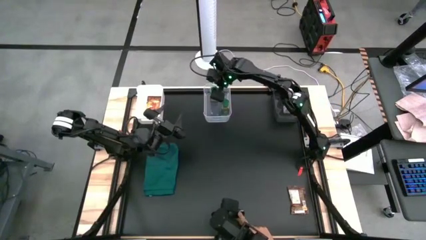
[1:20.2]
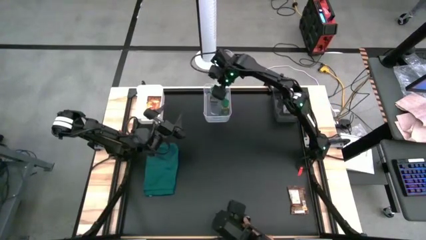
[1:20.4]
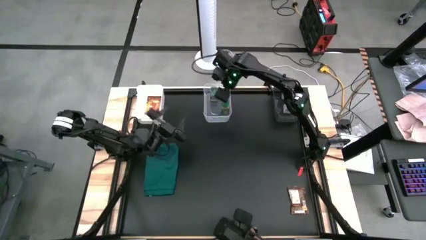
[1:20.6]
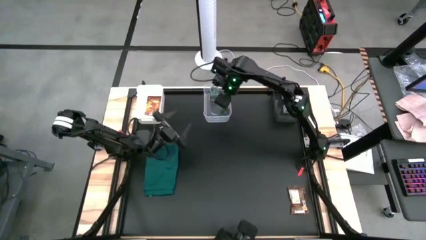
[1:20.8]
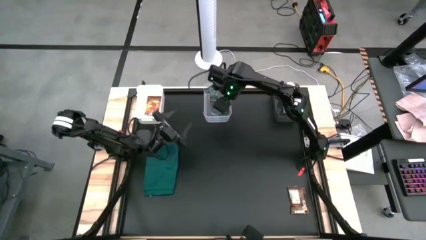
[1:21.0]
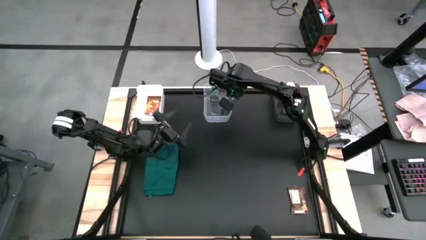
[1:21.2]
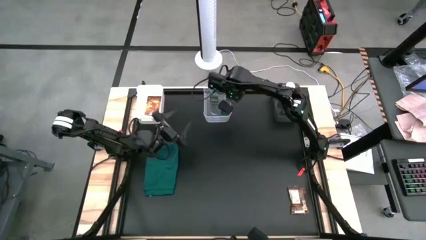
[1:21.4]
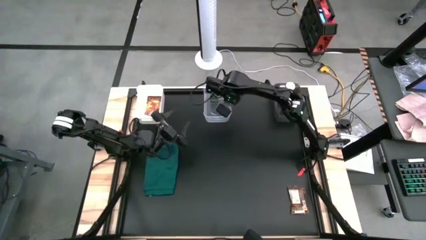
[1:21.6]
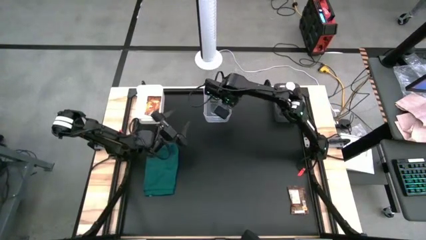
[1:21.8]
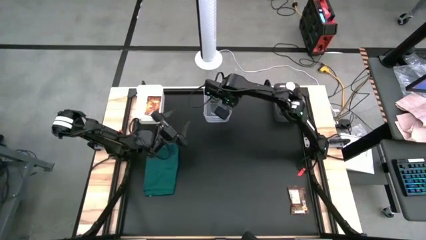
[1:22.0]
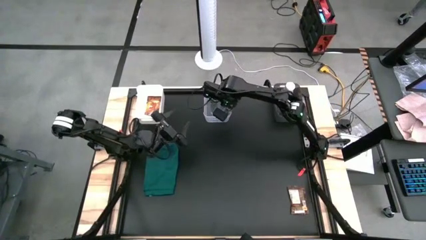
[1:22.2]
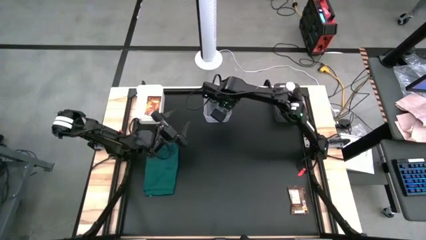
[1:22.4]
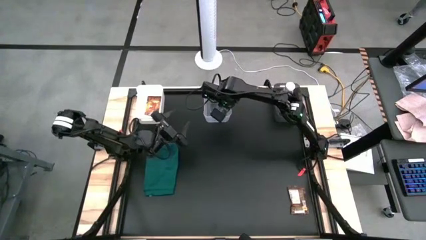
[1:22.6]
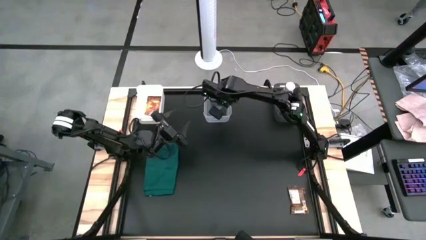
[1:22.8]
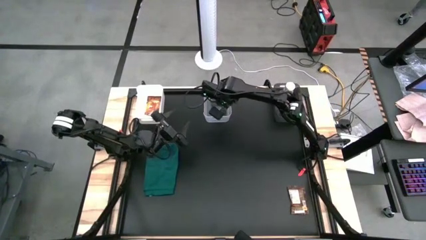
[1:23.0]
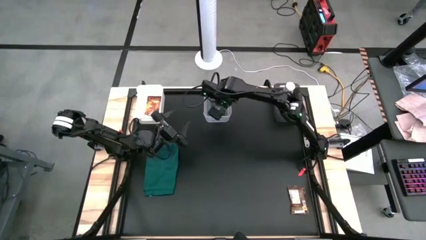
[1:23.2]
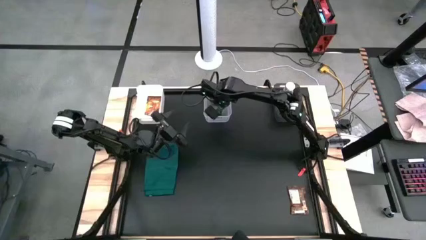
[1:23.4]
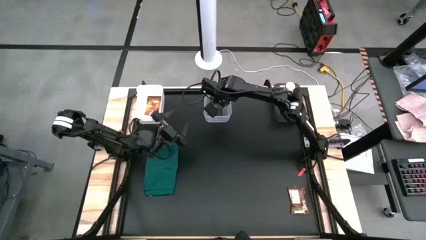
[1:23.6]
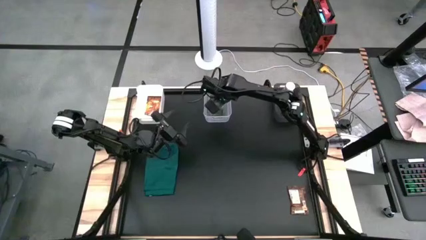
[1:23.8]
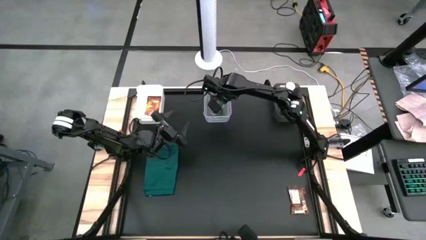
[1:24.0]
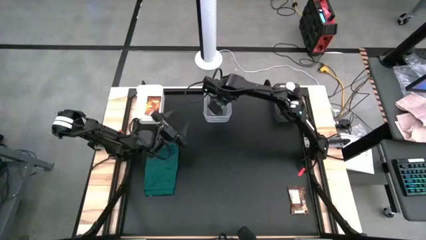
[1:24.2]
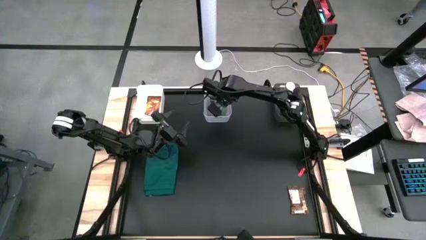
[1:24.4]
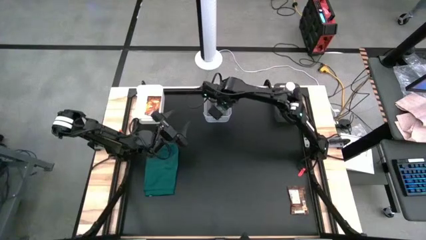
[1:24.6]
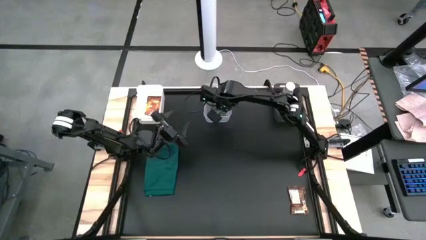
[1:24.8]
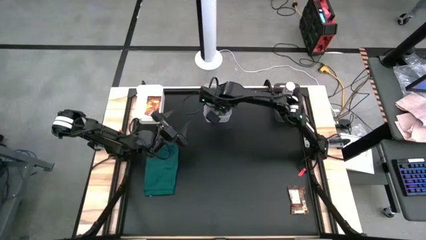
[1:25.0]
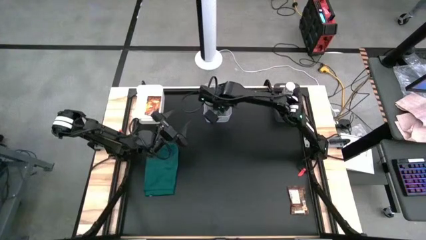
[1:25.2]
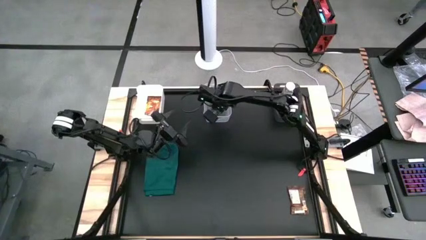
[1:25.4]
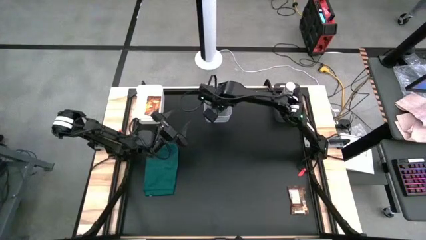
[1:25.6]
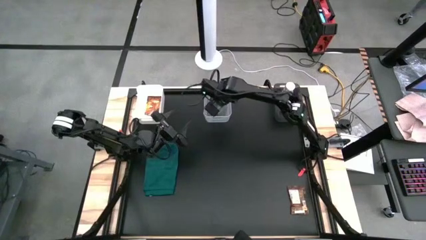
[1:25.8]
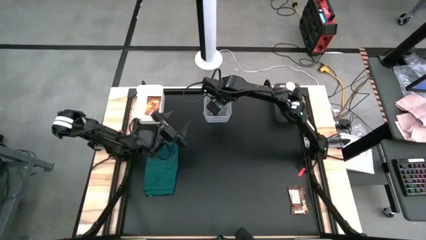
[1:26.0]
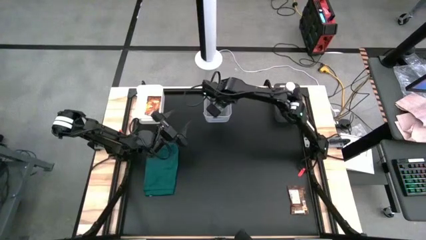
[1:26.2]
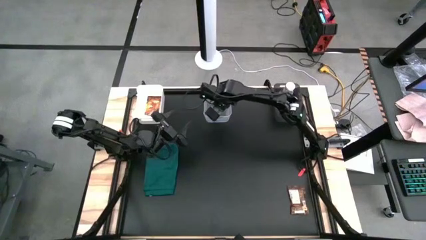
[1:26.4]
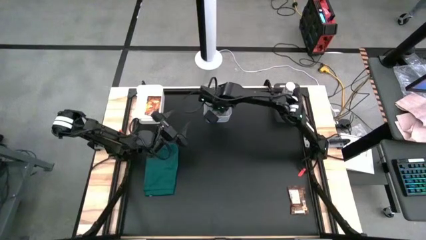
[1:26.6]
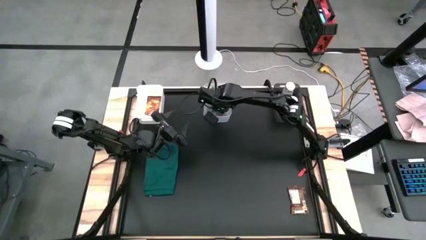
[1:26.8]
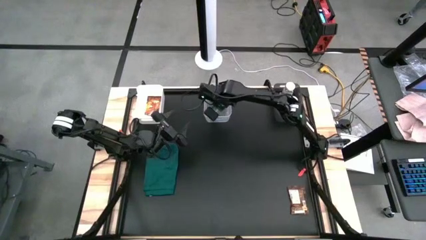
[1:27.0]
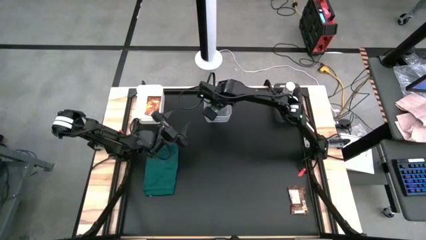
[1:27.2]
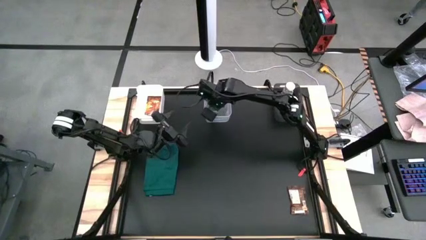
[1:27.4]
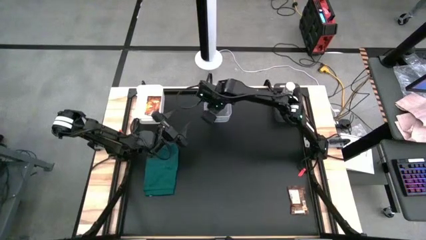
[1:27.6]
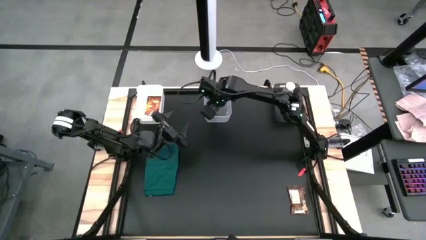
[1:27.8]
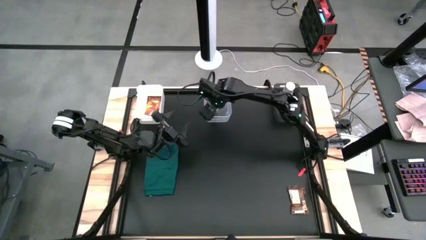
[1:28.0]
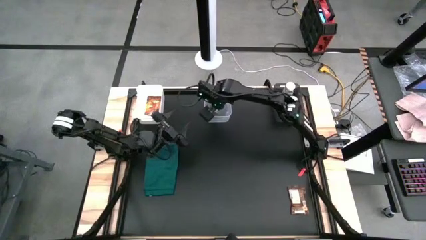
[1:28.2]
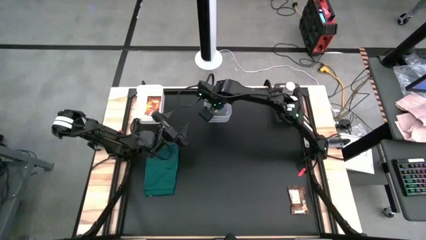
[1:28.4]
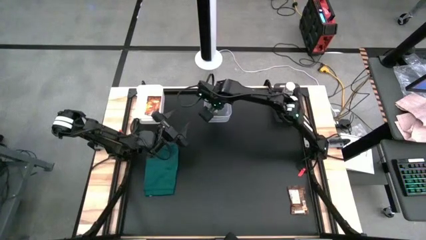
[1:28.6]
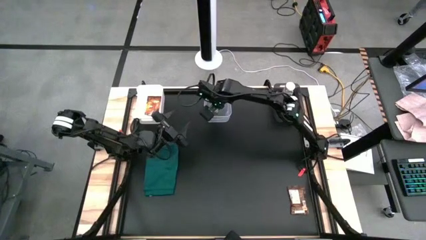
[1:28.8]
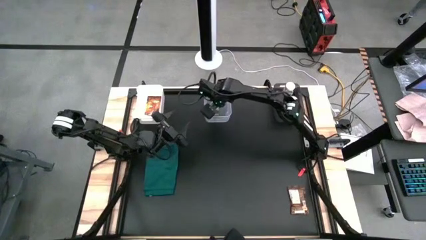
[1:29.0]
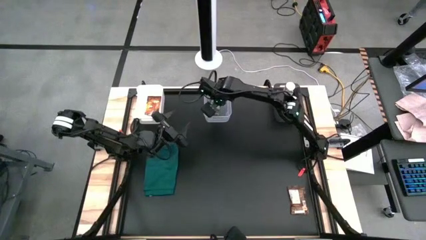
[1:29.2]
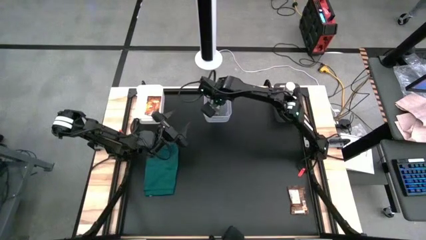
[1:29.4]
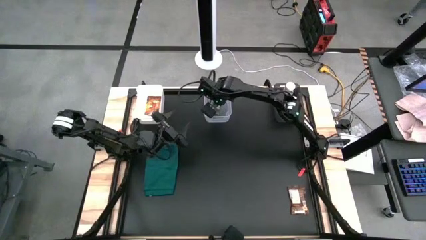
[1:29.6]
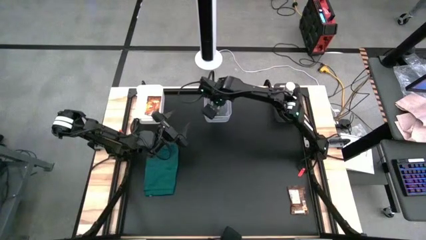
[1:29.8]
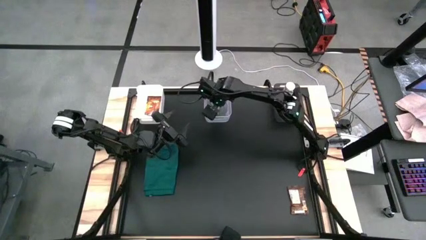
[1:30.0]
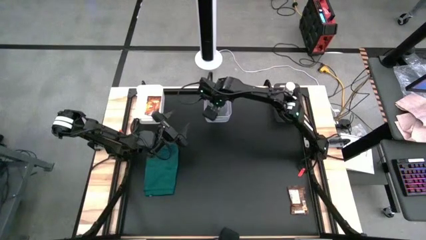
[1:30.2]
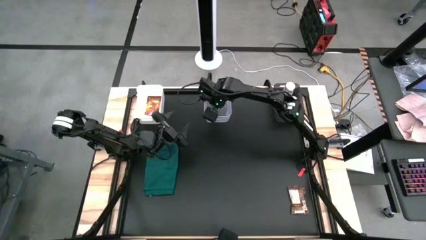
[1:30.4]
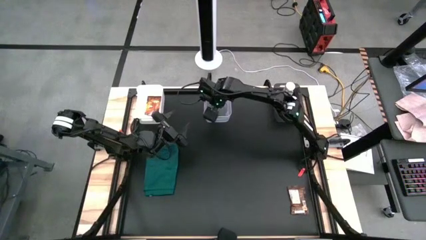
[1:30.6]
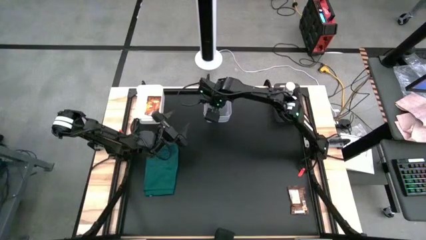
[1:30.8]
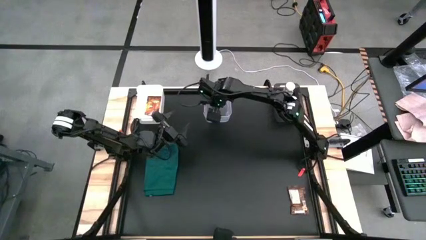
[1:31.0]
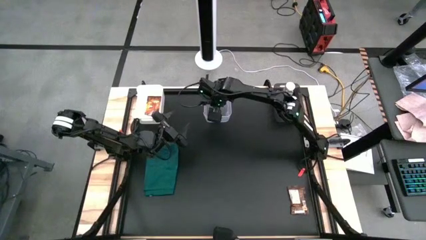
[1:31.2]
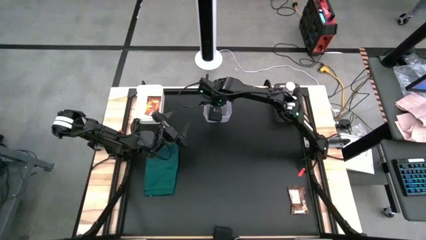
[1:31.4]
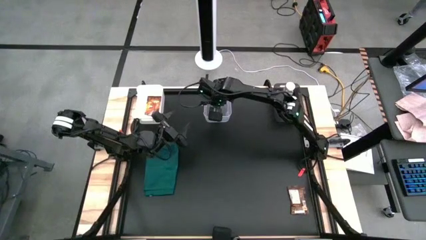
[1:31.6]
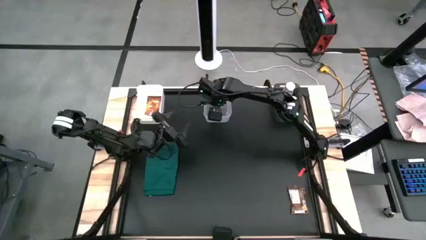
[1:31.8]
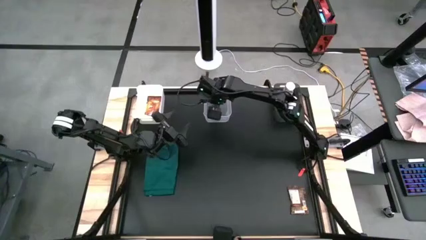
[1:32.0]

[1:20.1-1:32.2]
Task: Sort spices by type
Adjust the green seasoning bottle

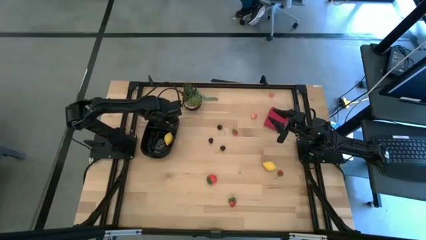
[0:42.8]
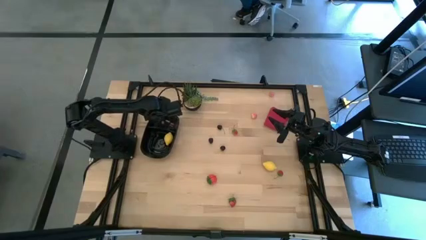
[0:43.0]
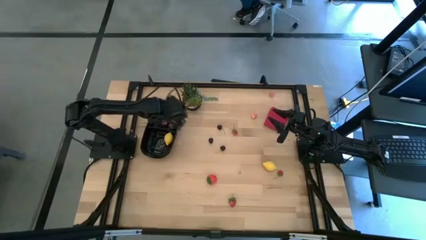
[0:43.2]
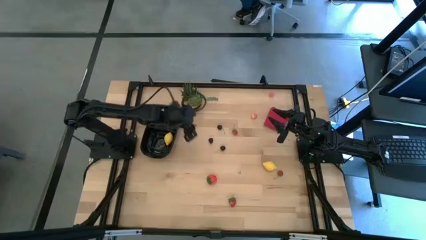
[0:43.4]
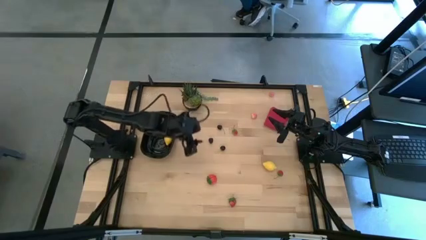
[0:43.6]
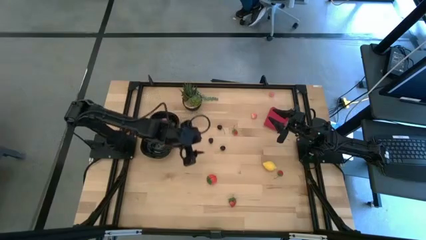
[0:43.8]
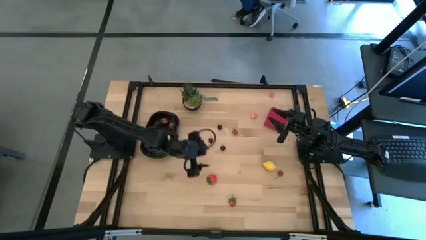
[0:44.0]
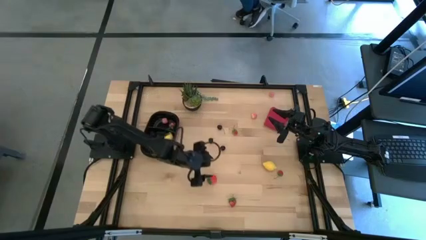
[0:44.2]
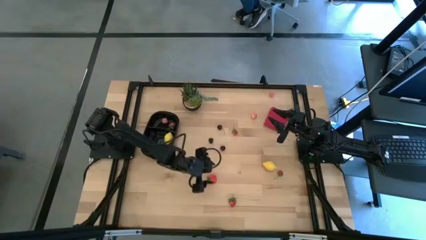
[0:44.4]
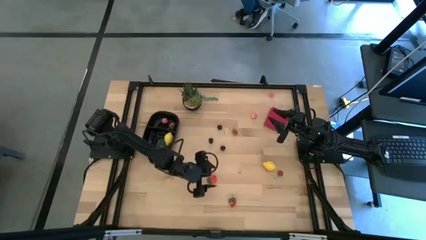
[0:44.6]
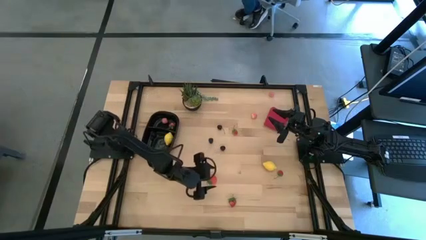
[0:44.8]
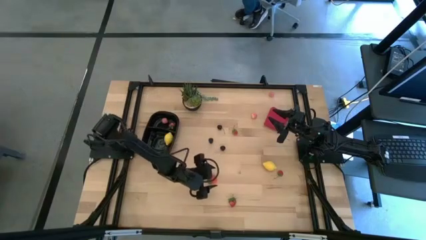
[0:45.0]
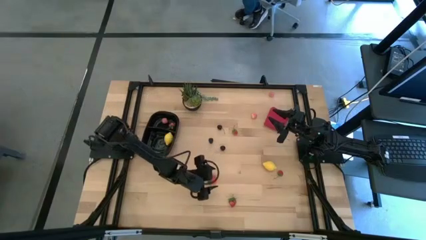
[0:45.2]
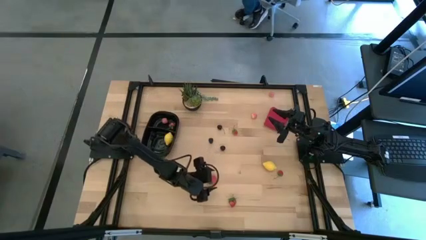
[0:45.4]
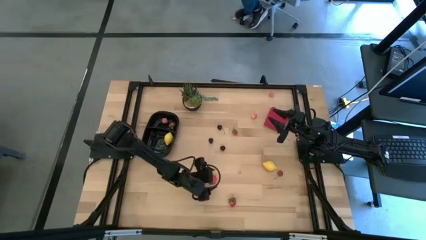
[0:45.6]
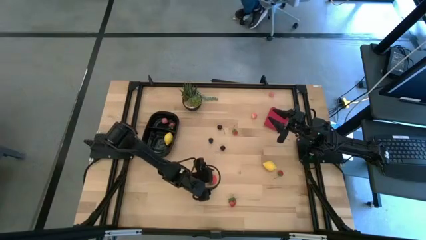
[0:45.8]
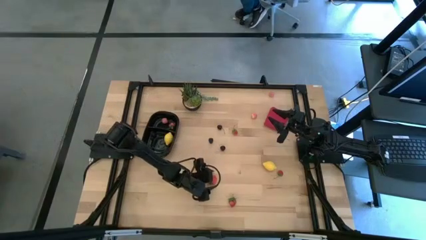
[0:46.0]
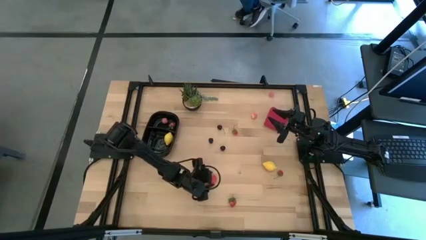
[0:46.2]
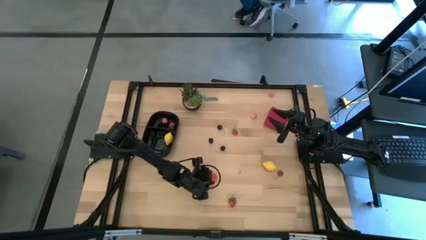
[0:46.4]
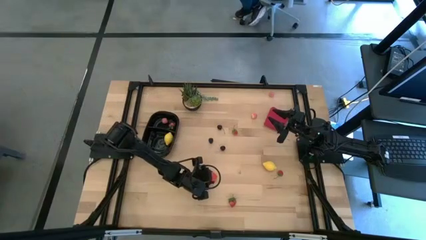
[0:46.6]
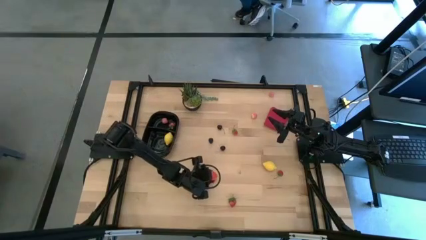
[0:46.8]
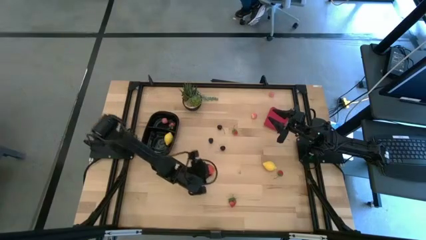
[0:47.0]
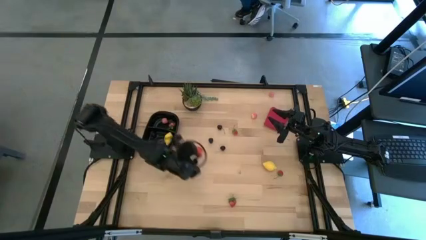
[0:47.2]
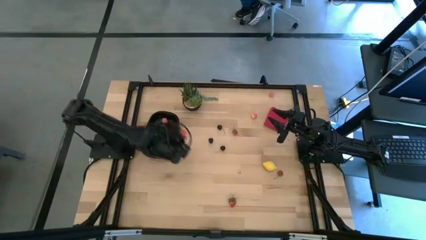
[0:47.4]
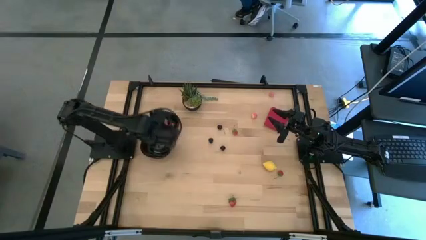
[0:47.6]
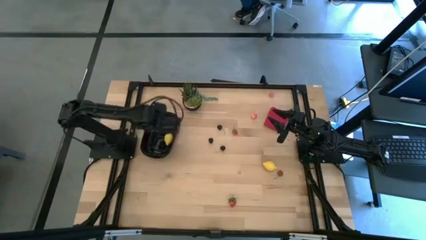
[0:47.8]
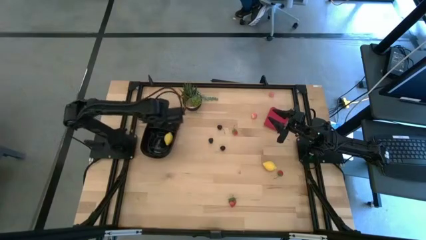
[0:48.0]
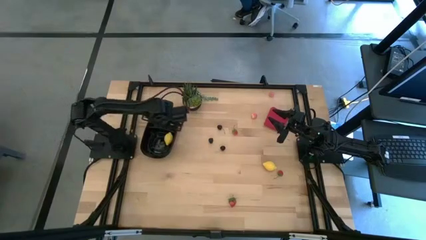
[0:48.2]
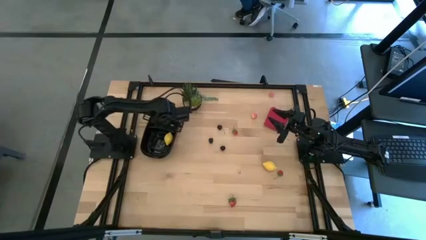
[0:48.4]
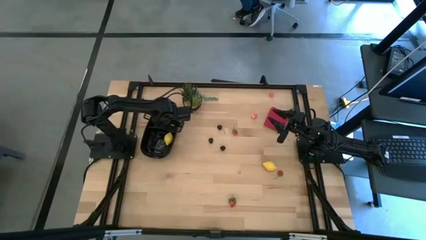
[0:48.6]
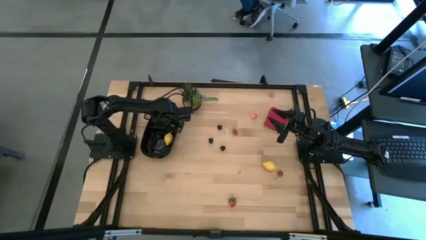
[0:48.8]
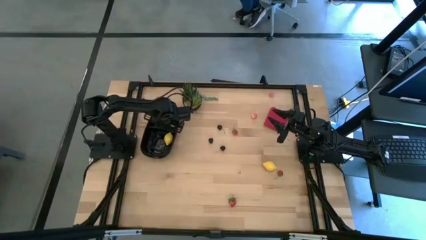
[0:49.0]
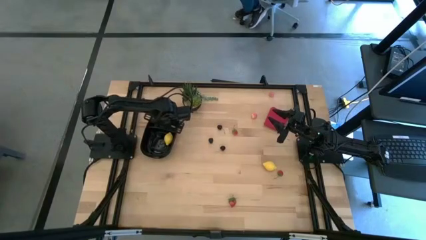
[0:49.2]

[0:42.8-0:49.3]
Task: Pick and placing Produce into tupperware
Put the red strawberry into the black container
